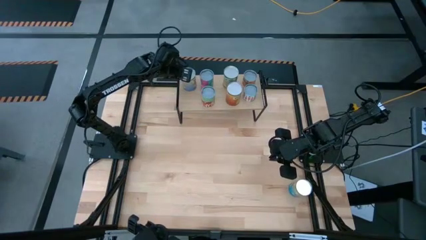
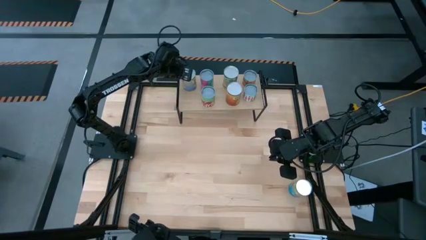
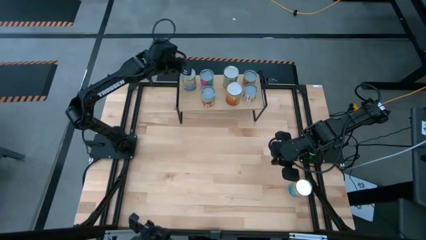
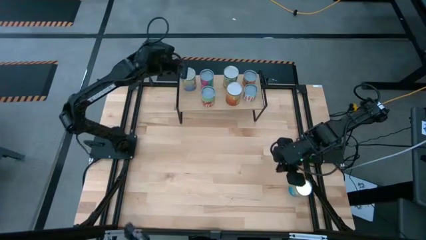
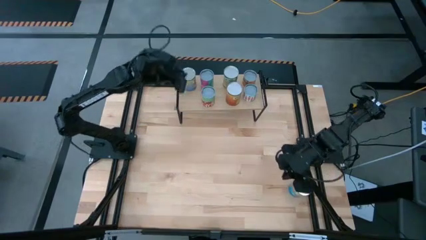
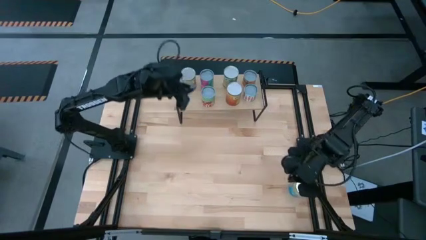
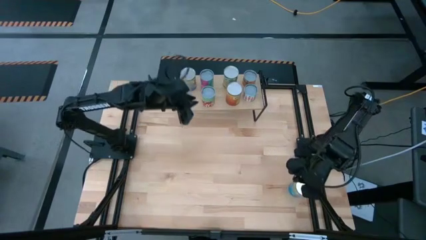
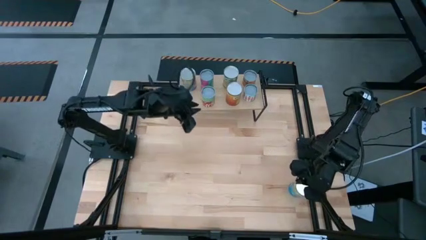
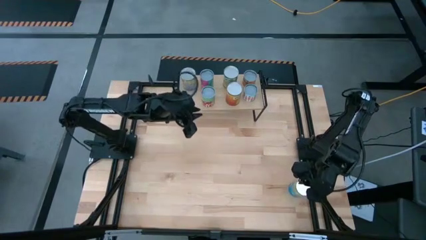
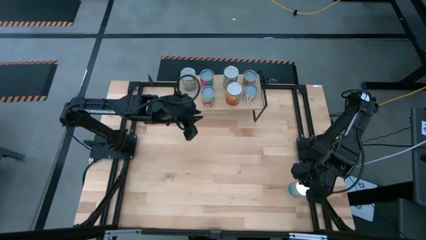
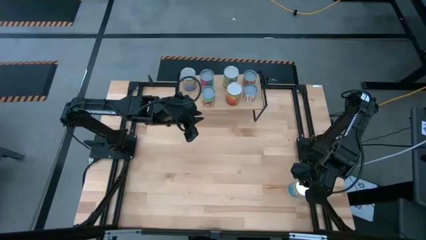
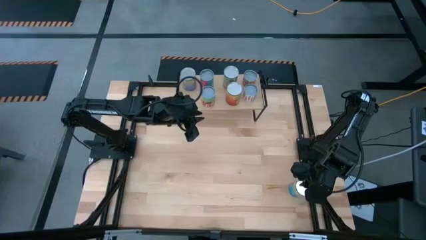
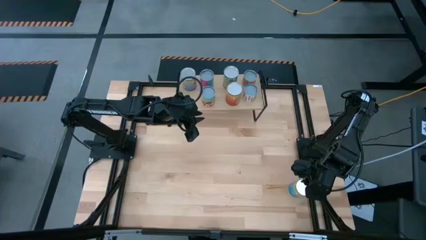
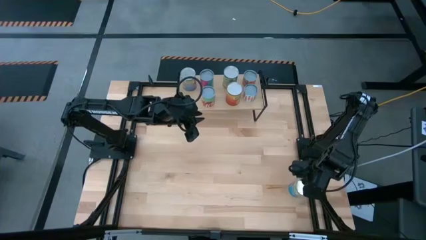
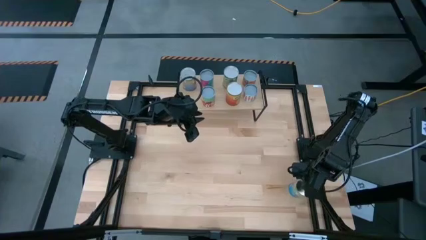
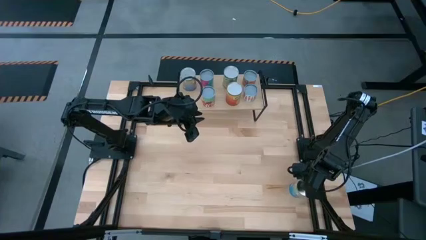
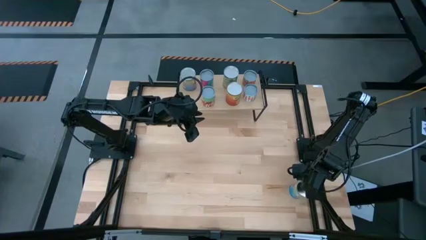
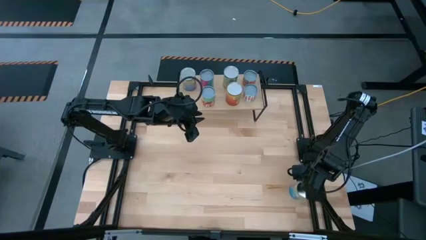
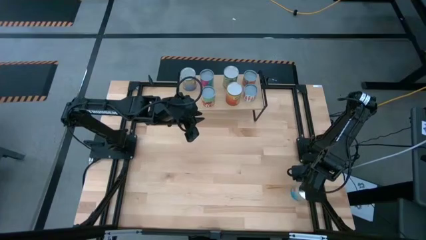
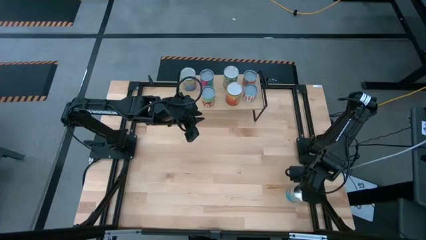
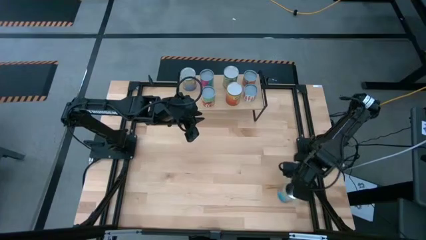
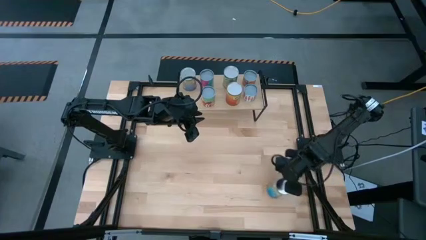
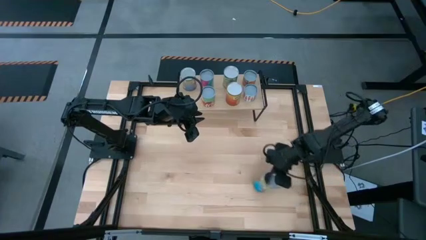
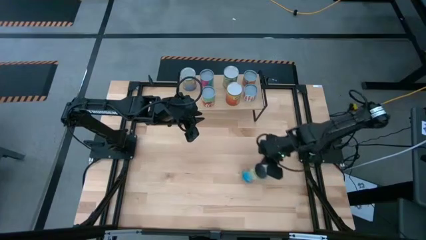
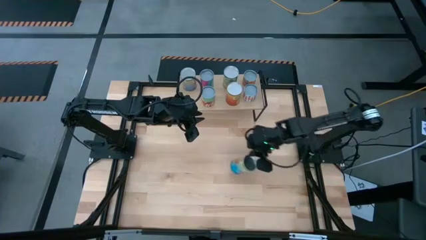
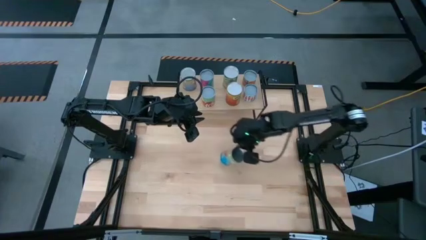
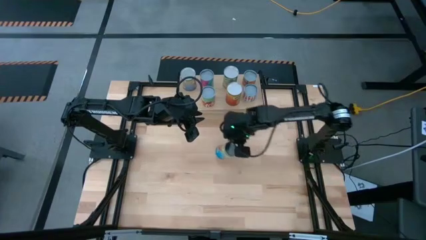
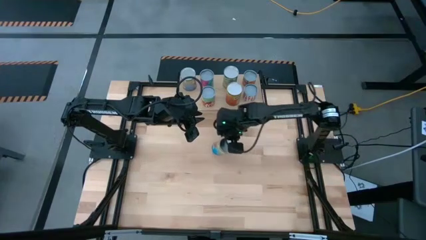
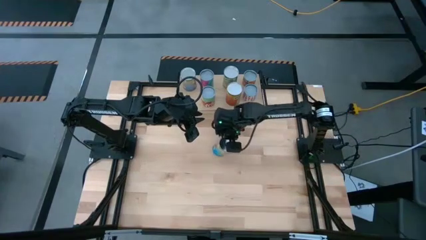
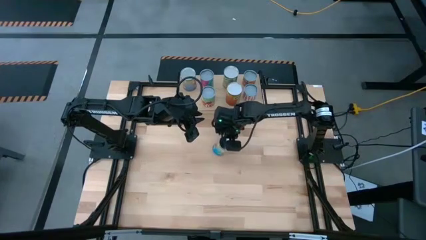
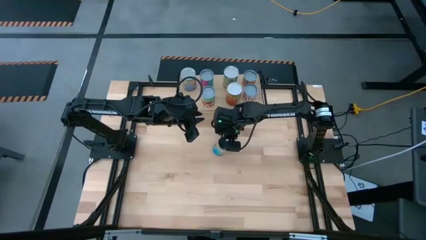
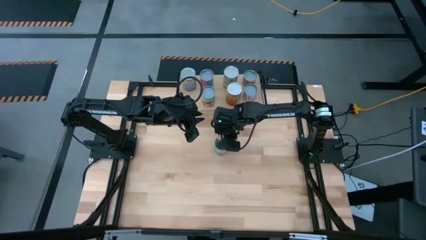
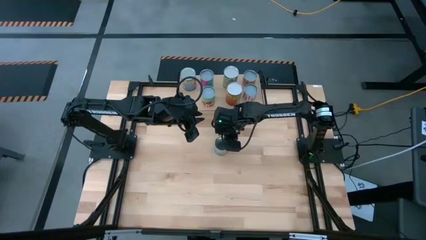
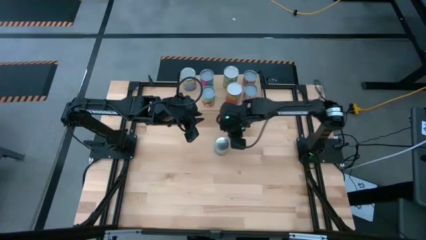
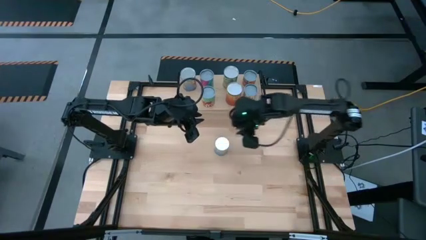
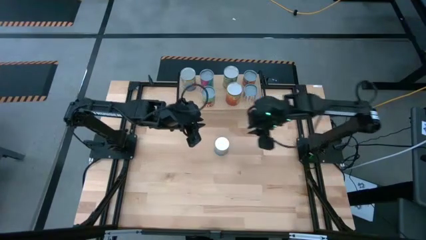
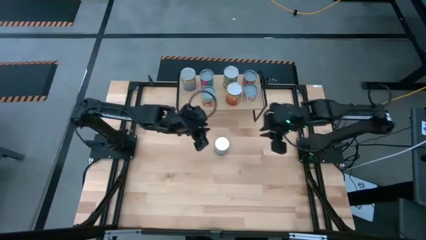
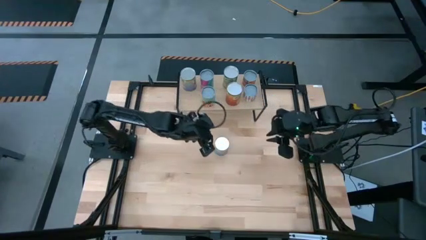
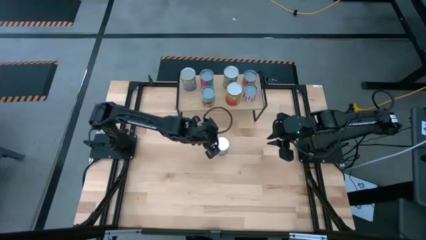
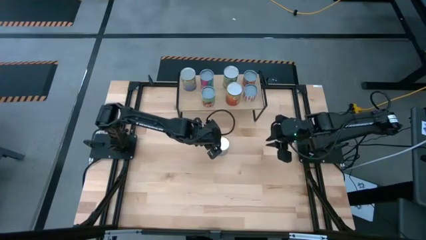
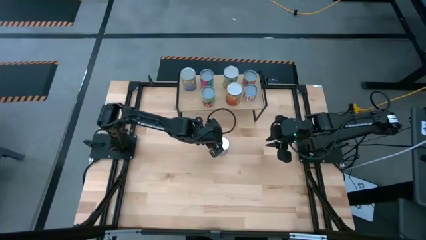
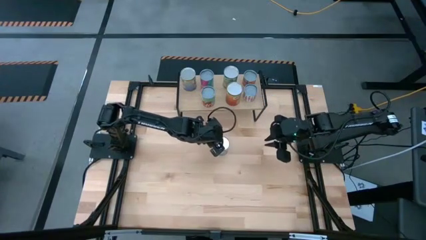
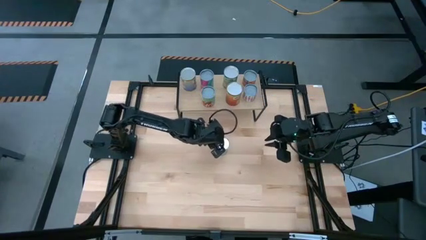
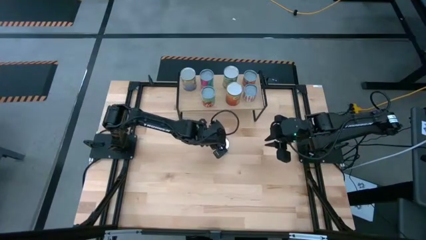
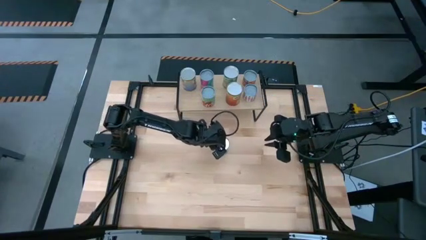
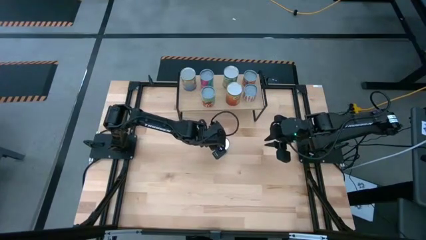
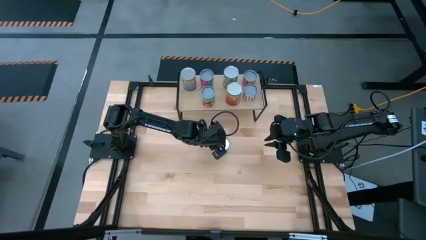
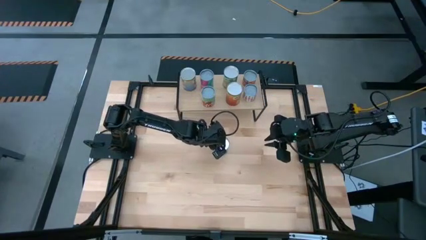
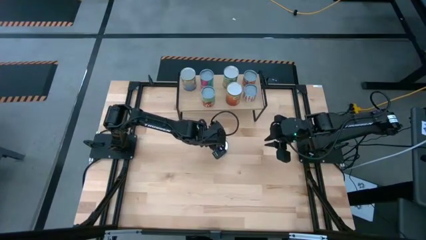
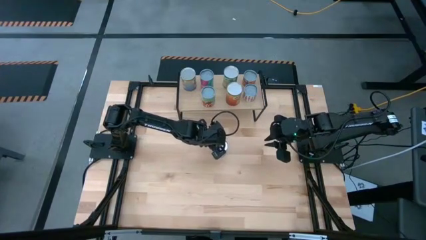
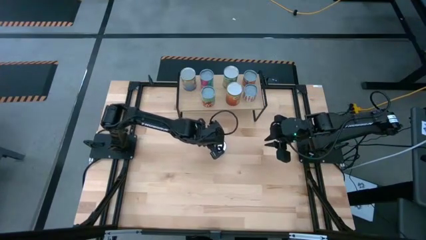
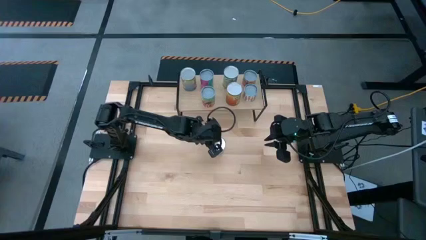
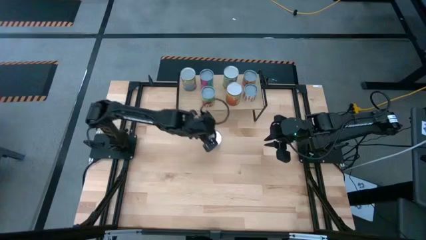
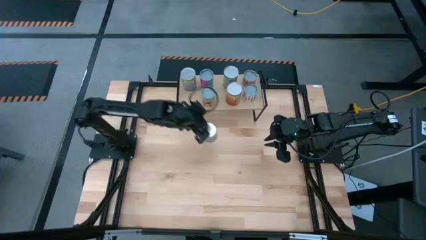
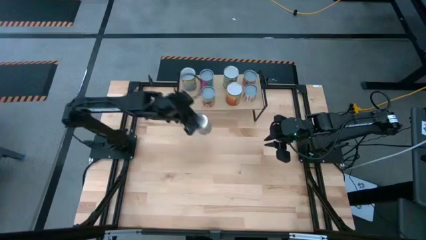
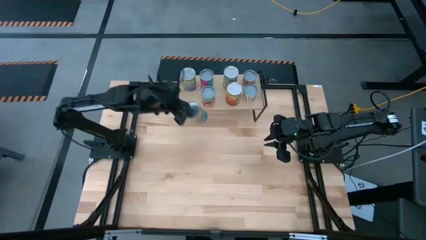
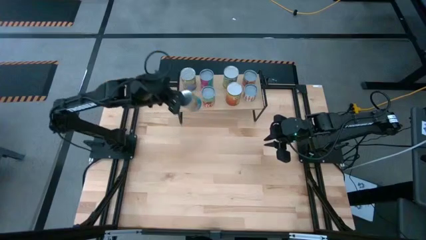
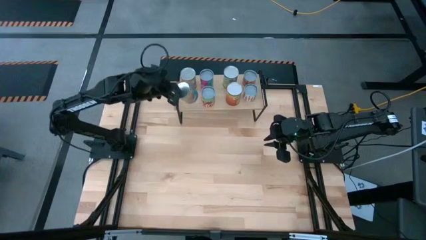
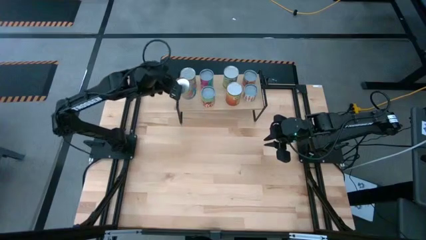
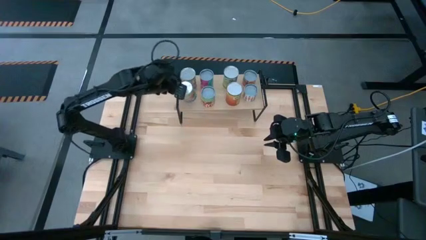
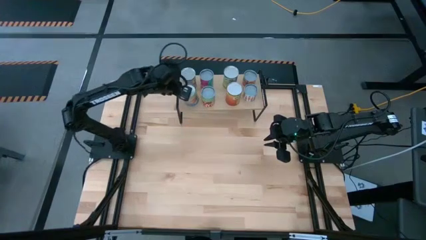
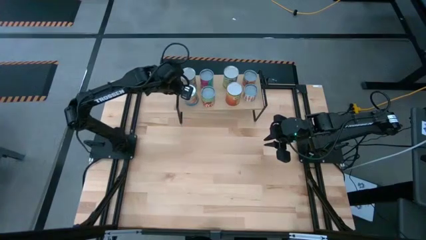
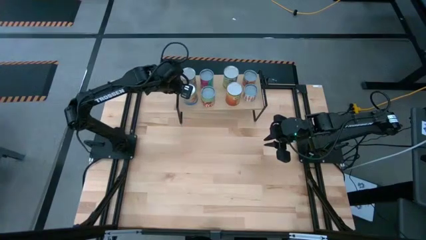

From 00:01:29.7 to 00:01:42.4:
Task: Pick and place cans onto a shelf
Put the canned tomatoes on the shelf
